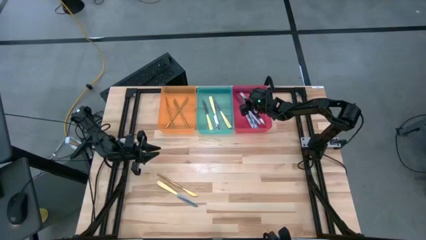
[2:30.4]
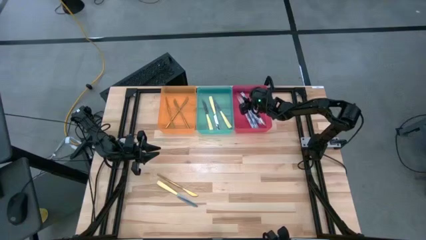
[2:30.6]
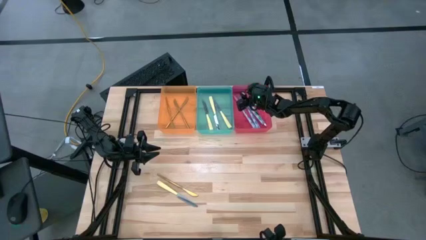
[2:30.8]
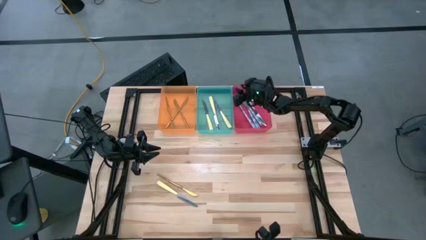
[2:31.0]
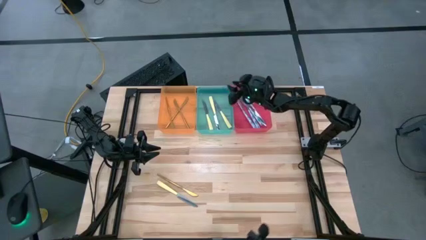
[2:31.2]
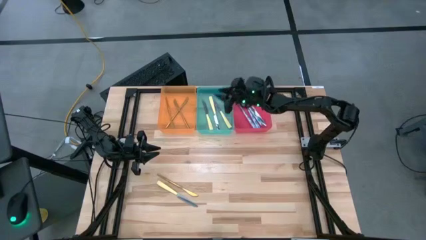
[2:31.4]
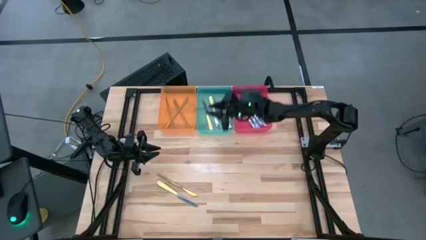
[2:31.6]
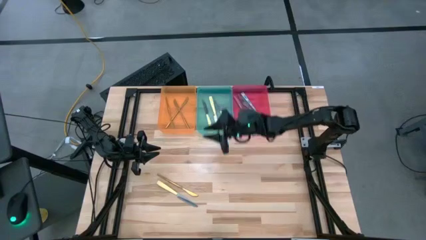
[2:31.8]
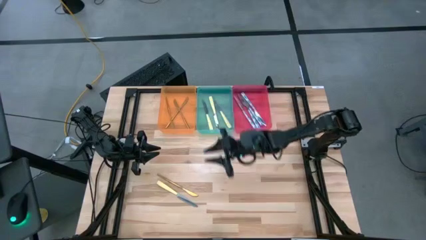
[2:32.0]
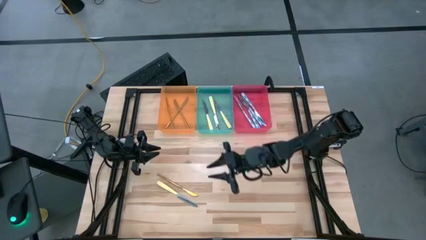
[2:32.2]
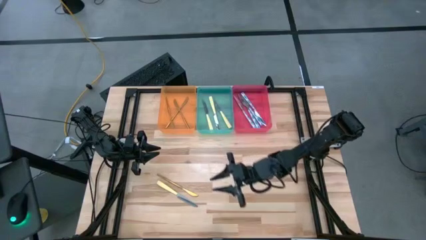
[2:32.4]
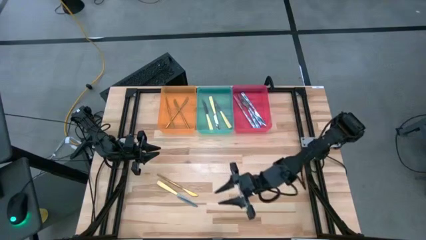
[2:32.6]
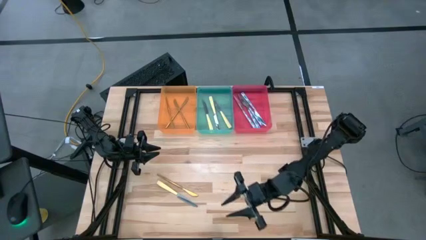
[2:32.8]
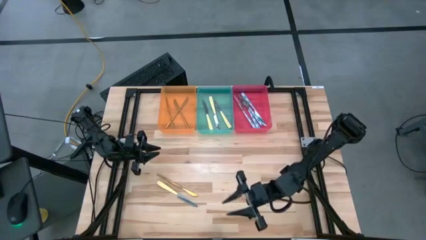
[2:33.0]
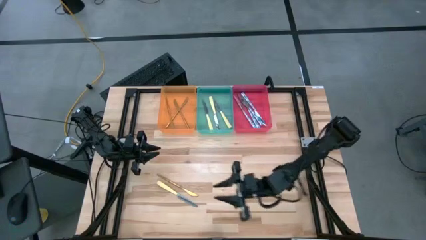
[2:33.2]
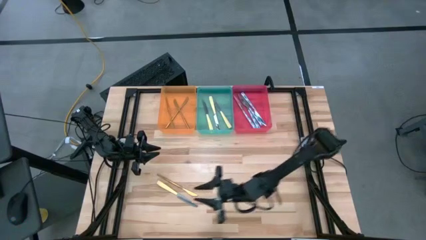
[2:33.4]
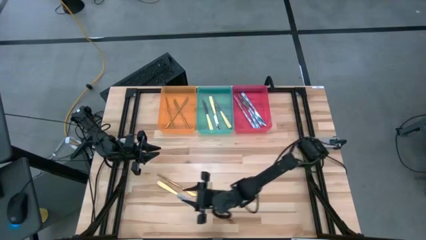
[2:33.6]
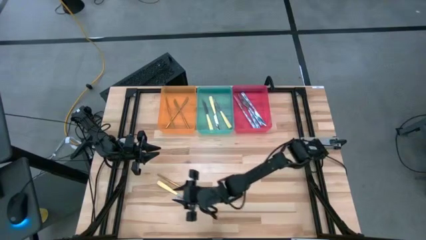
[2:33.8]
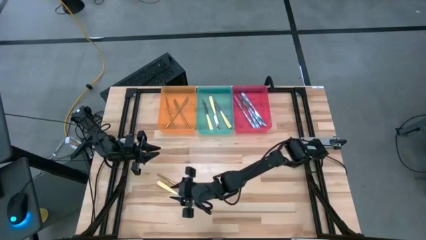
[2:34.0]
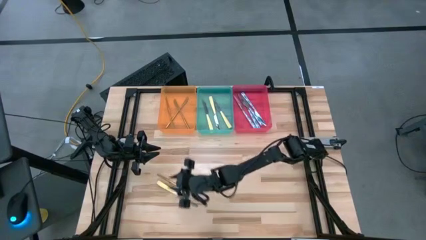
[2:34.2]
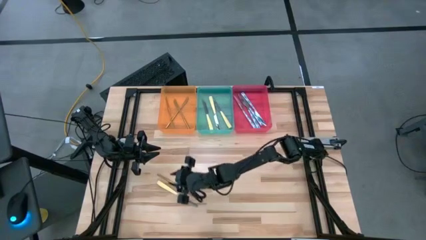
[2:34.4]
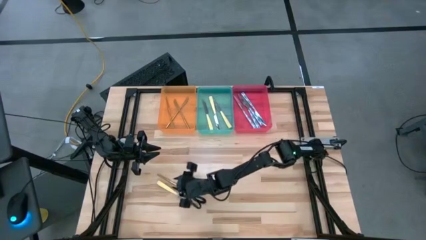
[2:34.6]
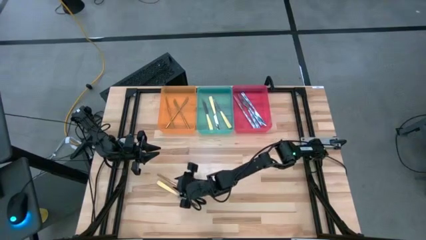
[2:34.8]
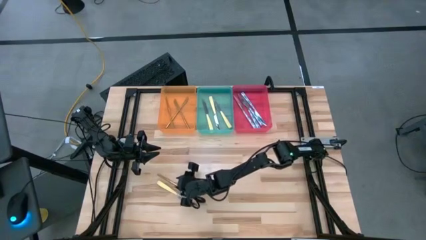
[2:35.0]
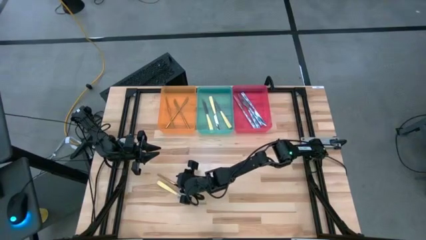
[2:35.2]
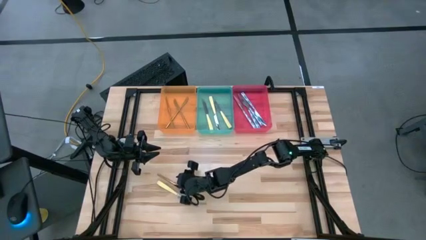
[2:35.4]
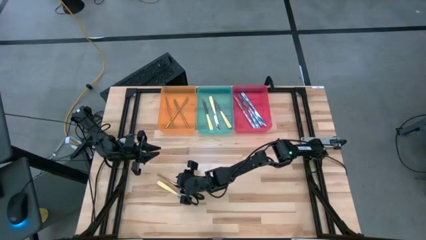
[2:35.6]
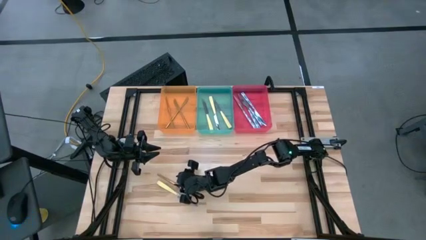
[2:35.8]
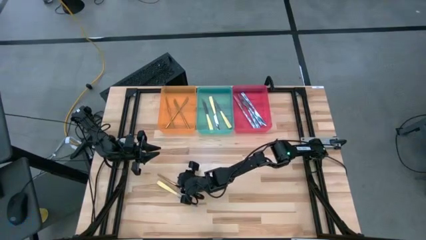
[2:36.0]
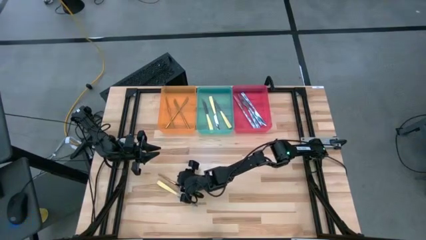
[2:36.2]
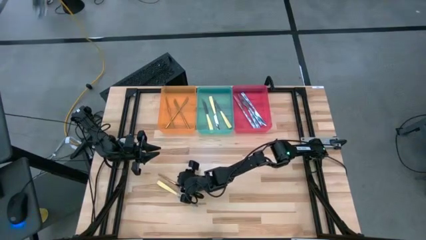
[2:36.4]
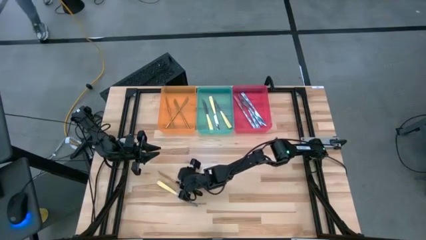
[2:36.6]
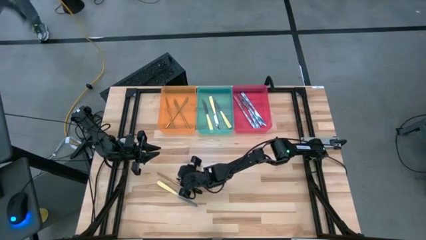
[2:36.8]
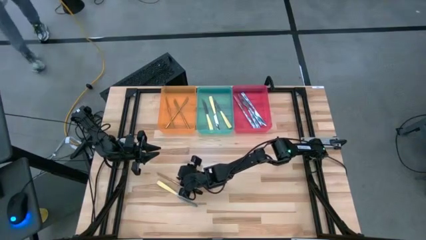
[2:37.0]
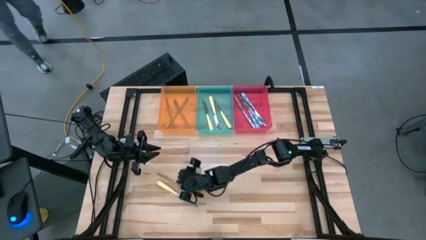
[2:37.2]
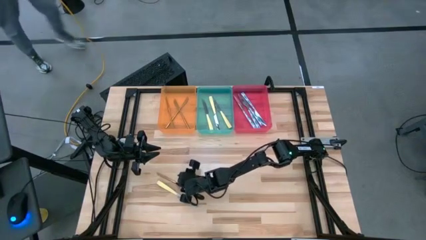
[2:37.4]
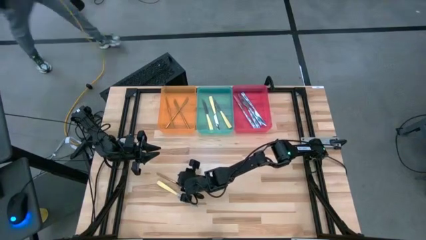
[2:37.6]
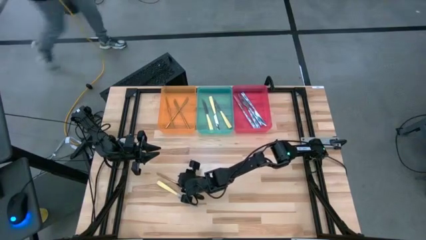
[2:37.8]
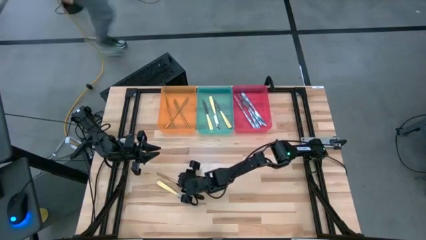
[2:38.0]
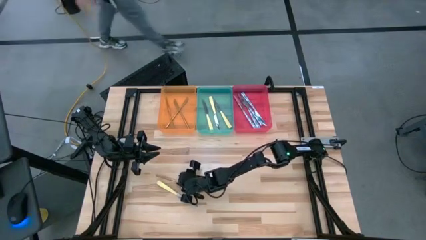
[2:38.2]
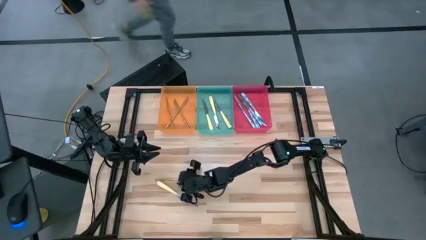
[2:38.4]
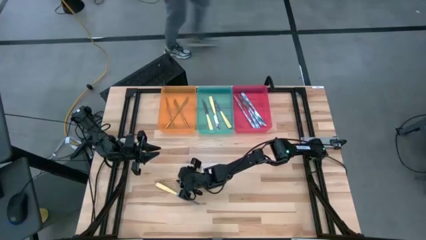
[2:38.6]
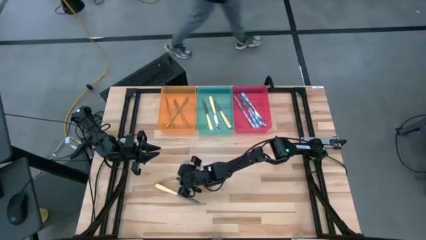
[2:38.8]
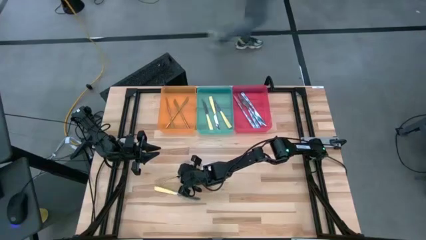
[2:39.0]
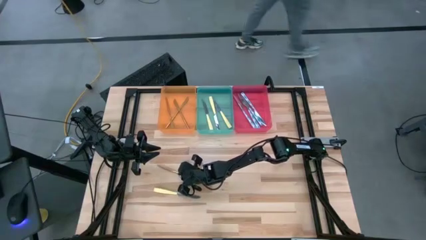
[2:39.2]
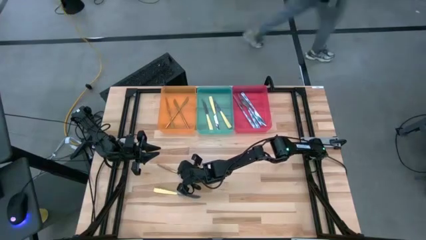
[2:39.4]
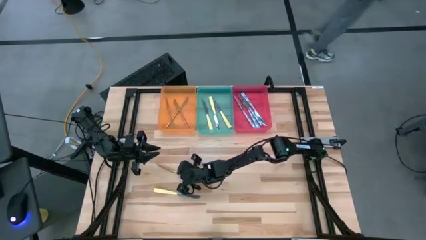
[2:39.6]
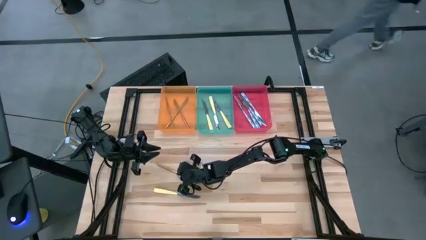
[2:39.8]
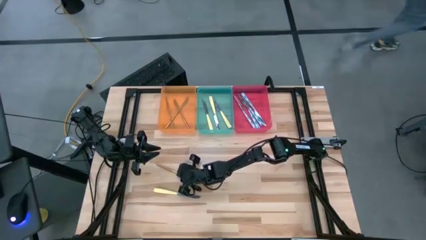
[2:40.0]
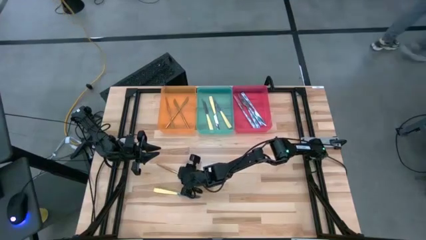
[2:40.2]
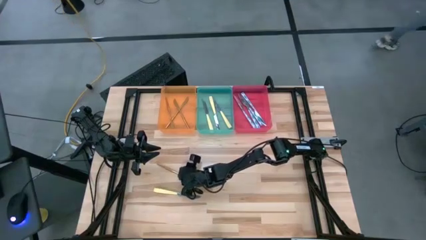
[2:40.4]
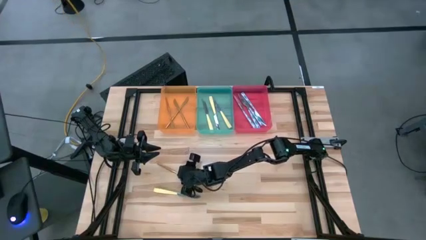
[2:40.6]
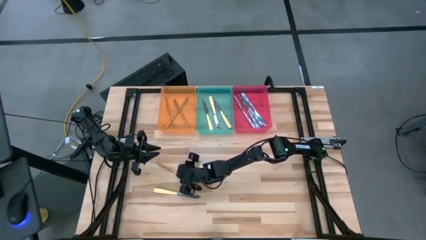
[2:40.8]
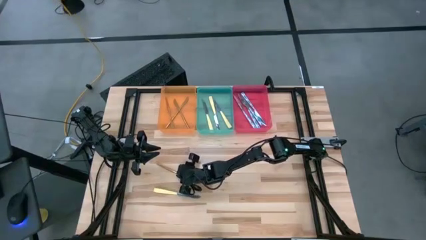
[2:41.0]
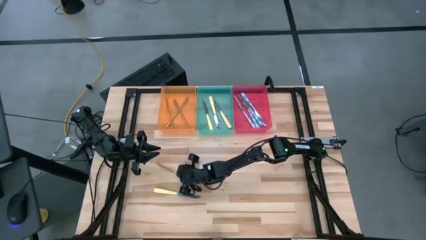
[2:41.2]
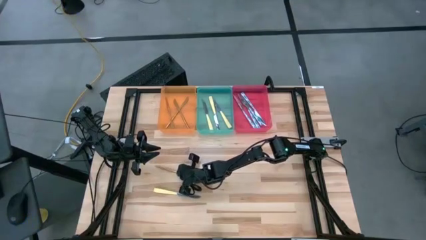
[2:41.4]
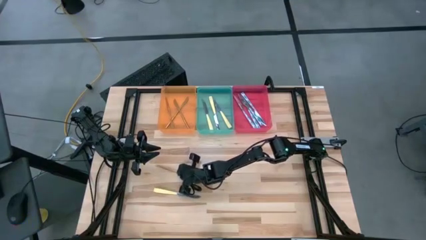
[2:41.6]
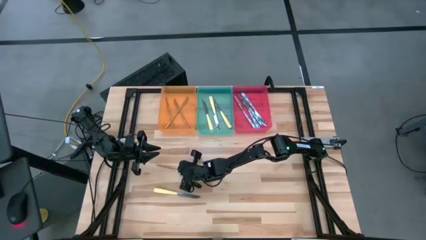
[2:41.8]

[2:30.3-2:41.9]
Task: Sort silverware by color (type)
Put the gold table knife into the orange bin

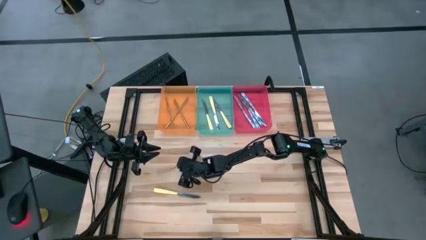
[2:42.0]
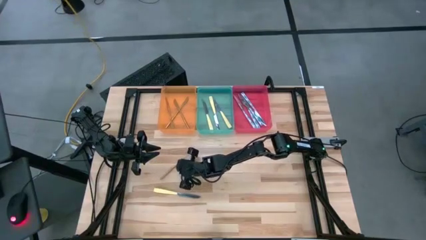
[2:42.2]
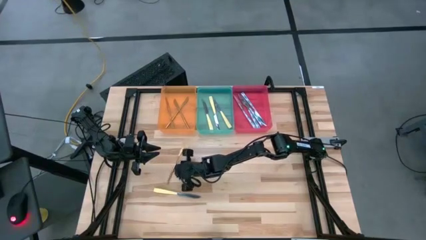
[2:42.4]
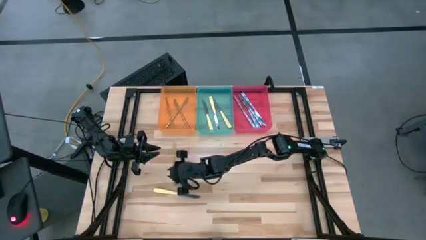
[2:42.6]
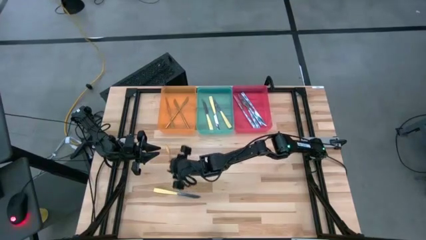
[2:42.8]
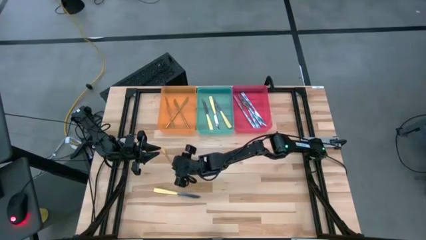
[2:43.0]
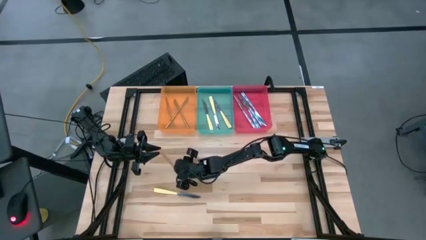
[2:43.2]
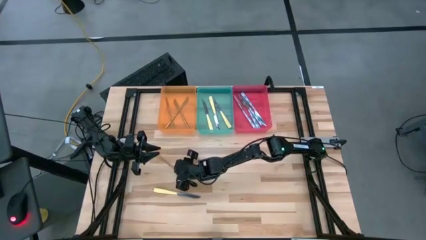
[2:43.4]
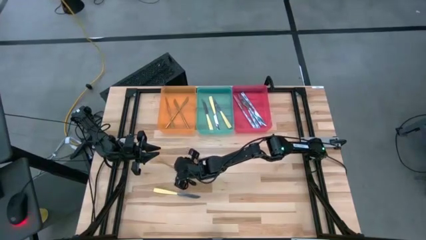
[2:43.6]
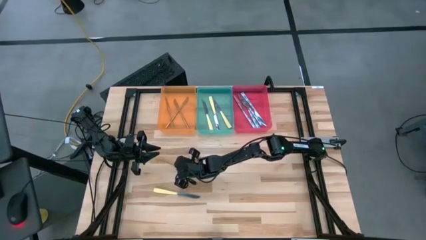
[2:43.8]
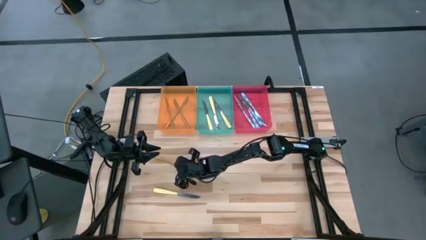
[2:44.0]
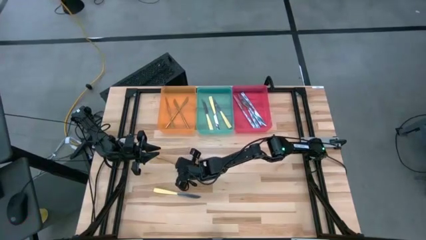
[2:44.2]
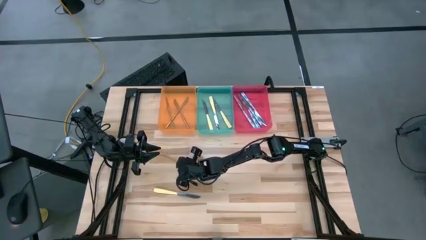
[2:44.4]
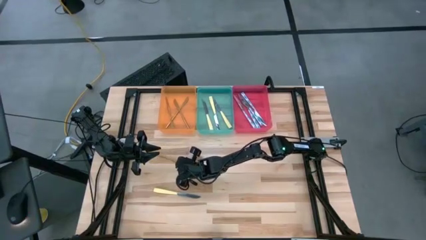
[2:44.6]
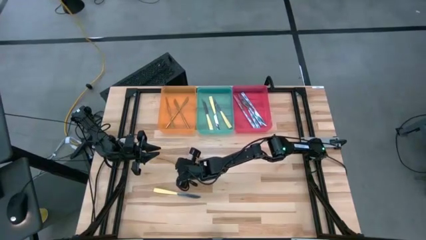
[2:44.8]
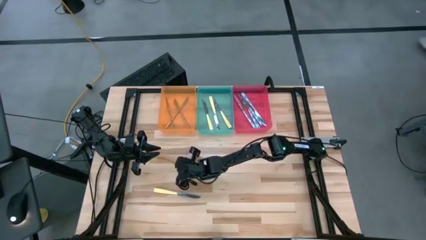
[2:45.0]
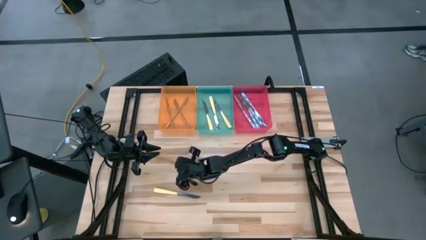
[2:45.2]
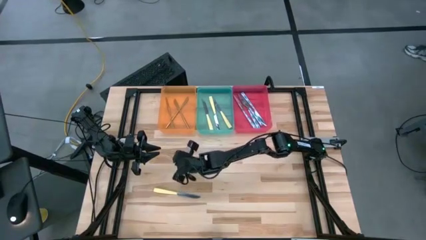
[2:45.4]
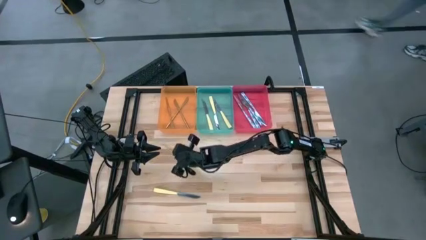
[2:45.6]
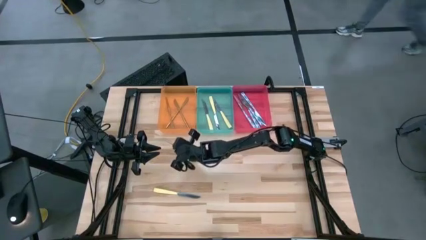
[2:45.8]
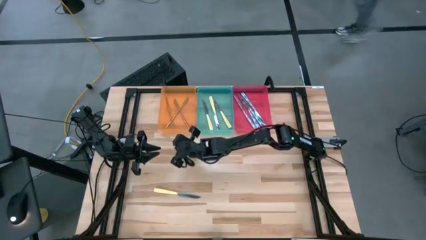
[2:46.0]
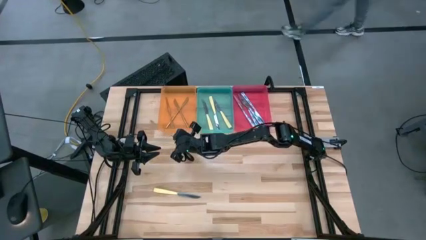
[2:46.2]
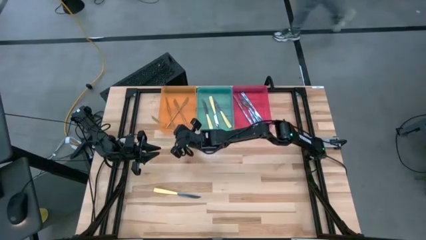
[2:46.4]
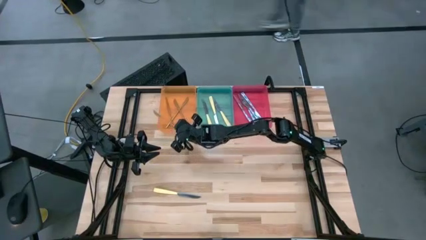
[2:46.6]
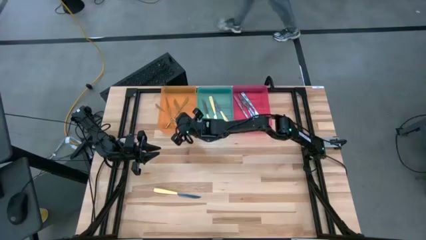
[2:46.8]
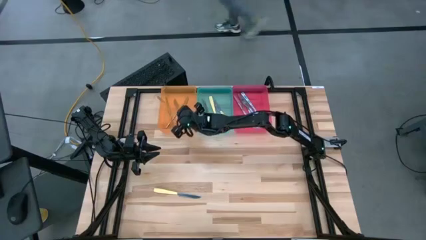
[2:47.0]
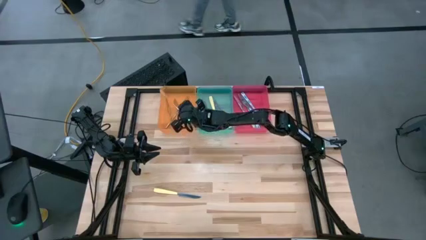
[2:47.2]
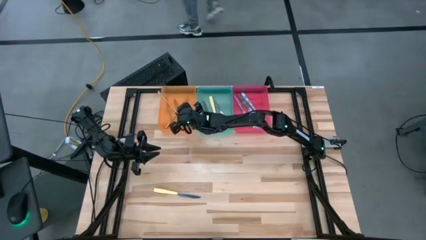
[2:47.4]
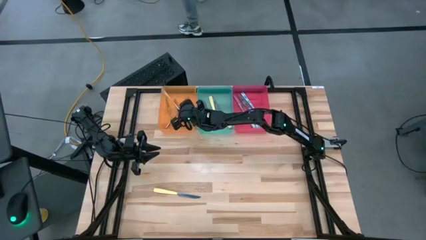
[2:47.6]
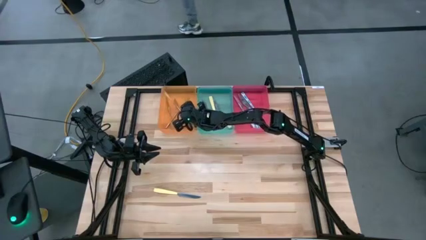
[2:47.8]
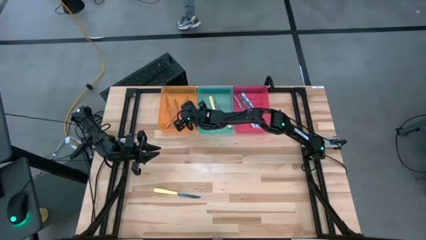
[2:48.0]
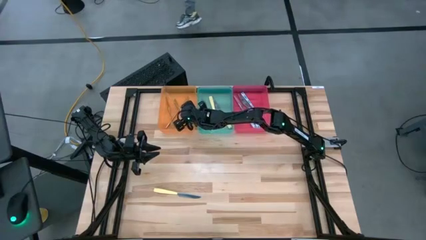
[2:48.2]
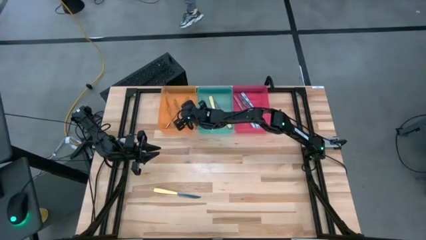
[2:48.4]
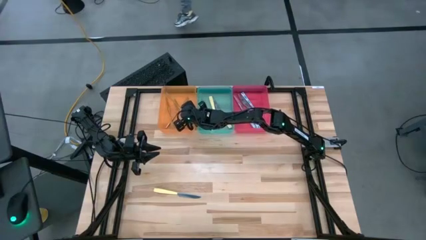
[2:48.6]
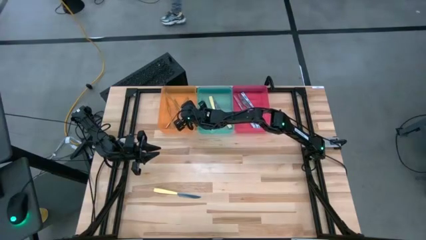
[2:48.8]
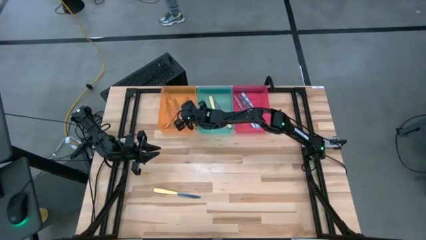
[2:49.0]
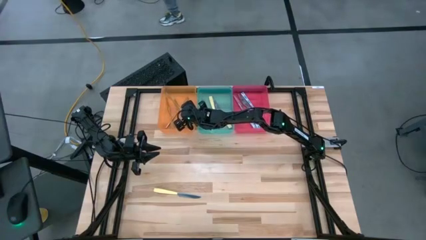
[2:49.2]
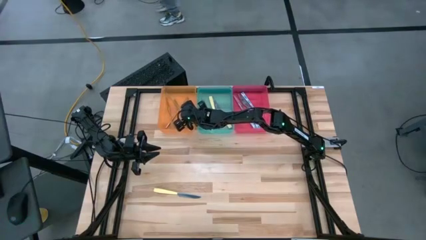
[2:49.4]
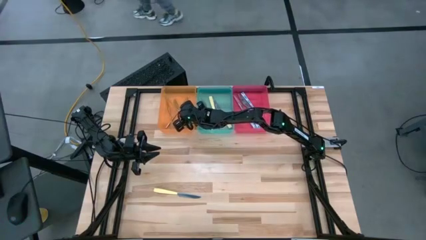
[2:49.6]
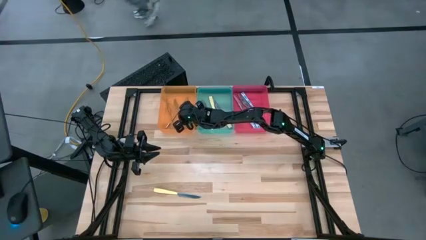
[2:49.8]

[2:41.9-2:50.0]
Put the gold table knife into the orange bin
